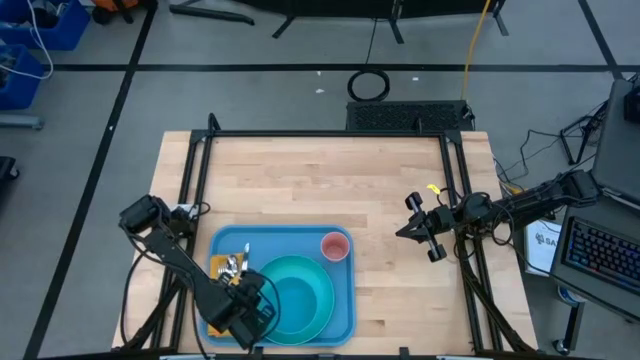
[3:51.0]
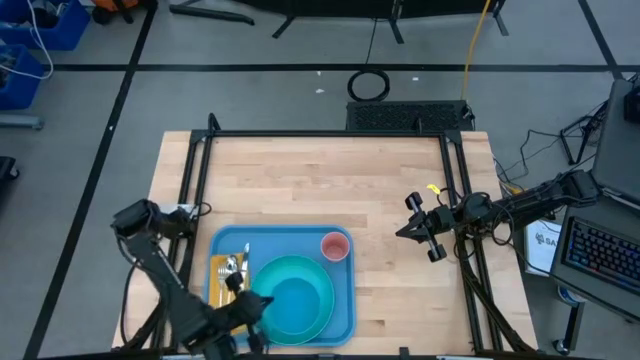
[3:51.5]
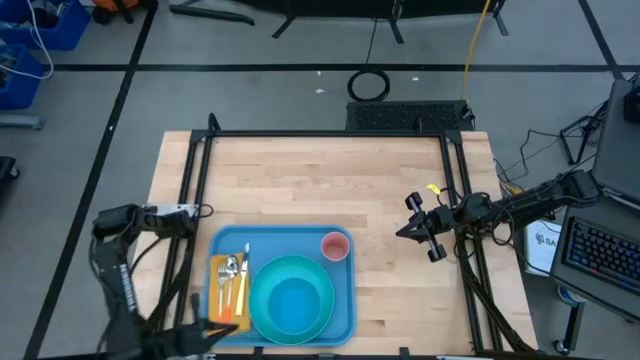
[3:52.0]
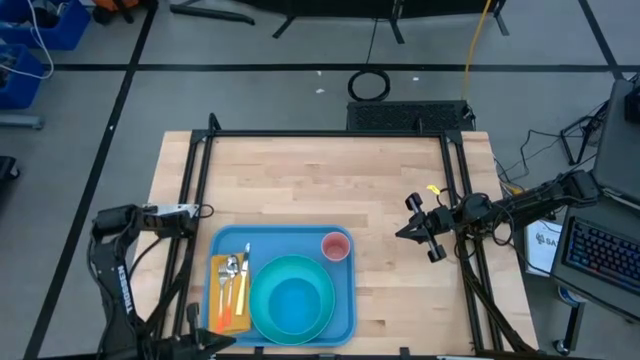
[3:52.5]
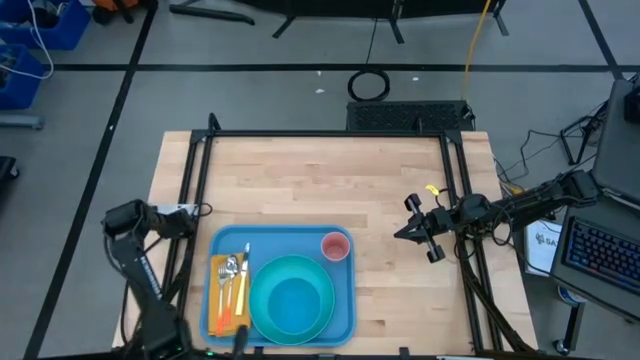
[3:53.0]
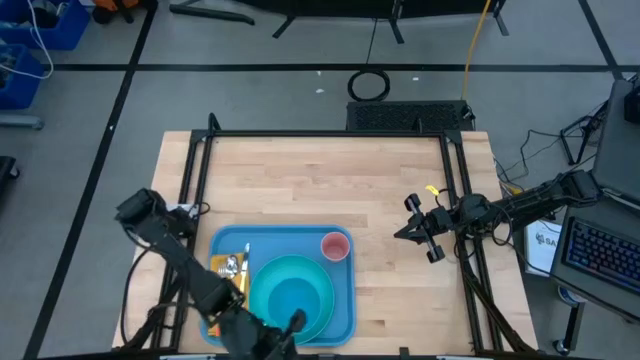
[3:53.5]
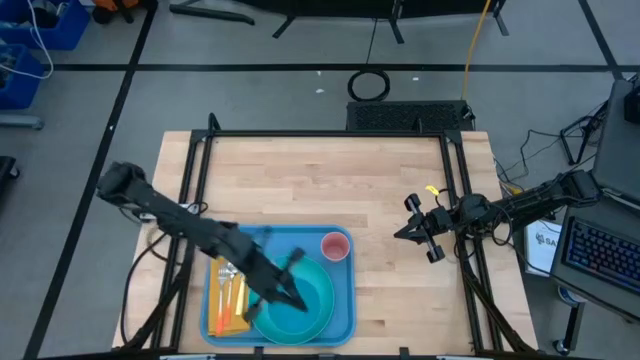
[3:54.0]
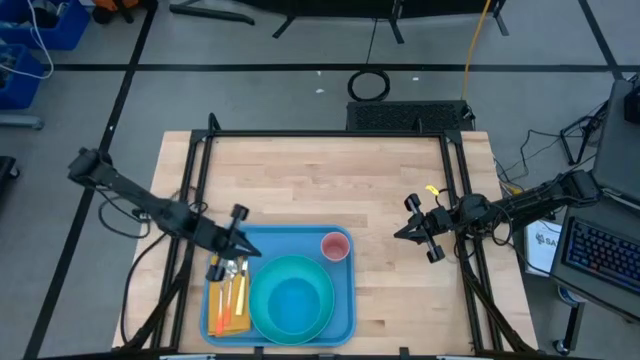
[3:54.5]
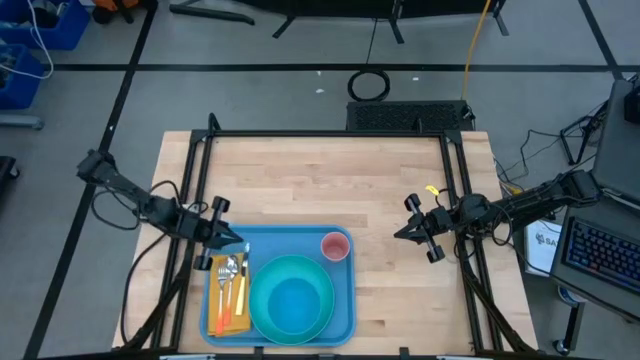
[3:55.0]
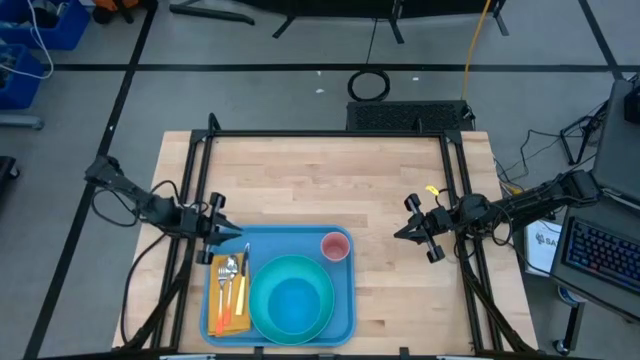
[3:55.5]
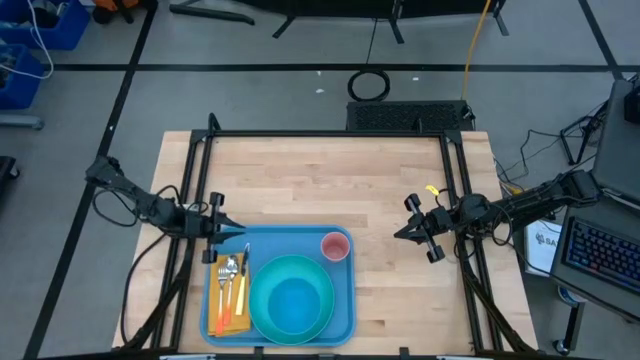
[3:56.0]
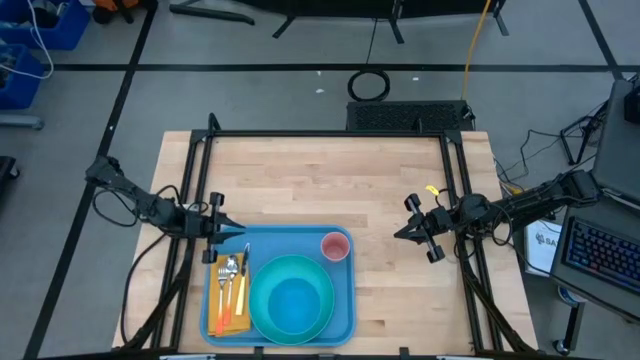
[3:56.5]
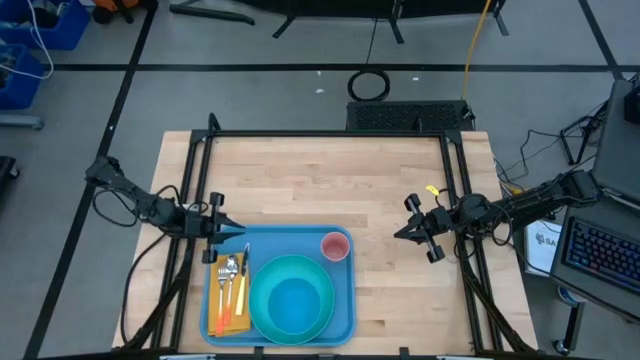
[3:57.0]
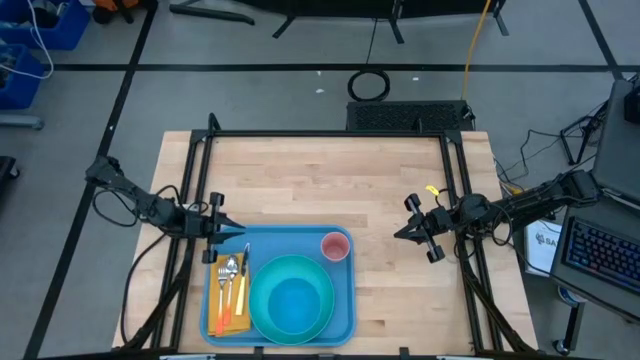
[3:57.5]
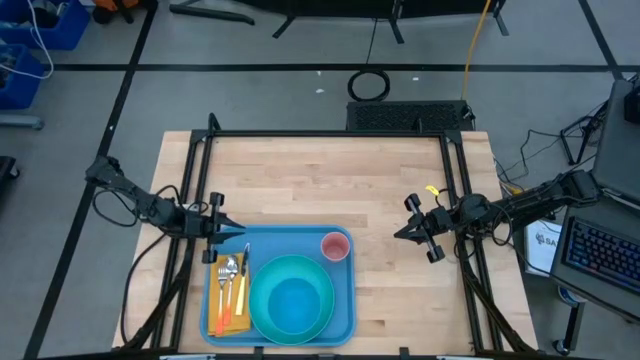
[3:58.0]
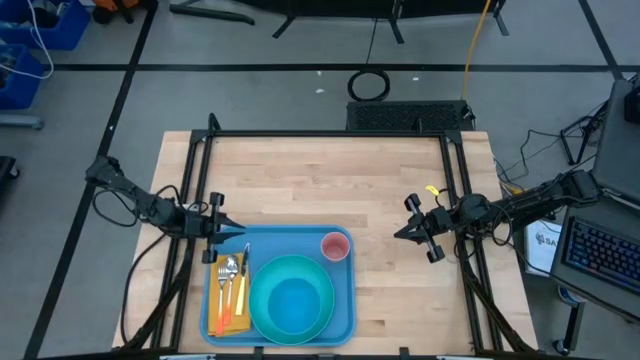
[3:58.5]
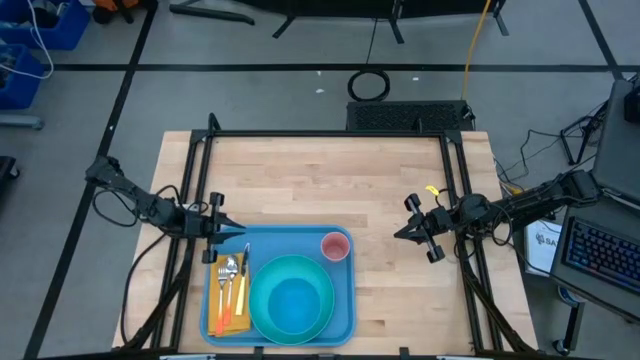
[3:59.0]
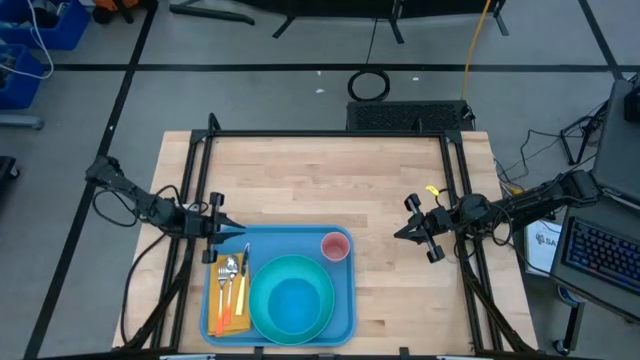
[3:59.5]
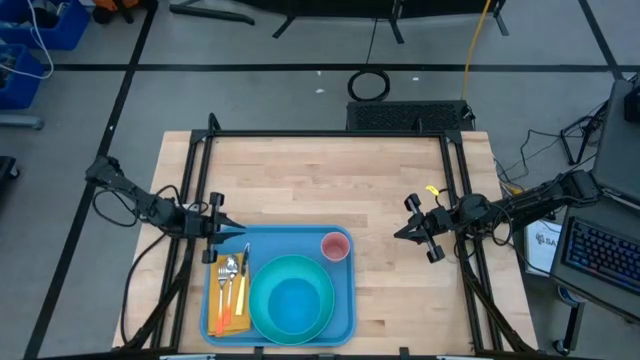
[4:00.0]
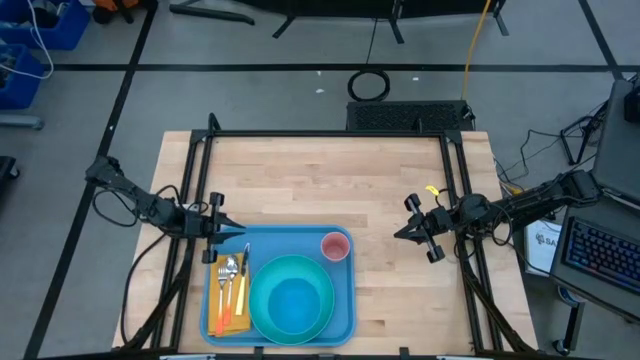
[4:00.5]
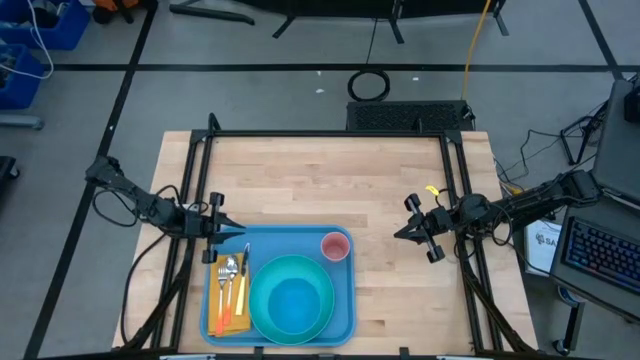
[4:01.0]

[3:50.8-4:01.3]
Task: Set up tray
Return to Home Position
